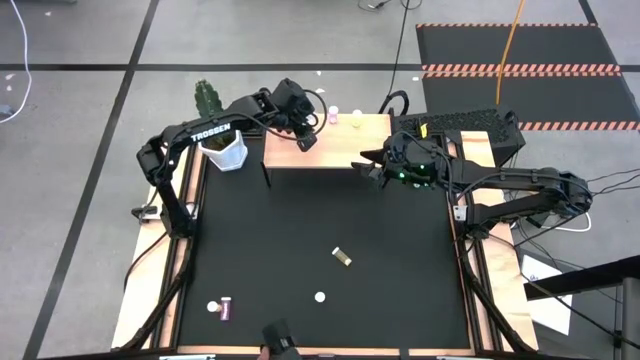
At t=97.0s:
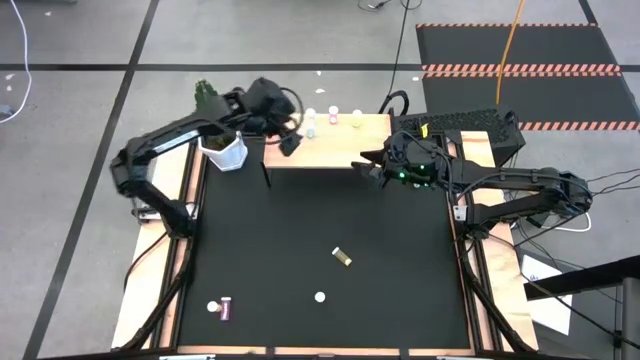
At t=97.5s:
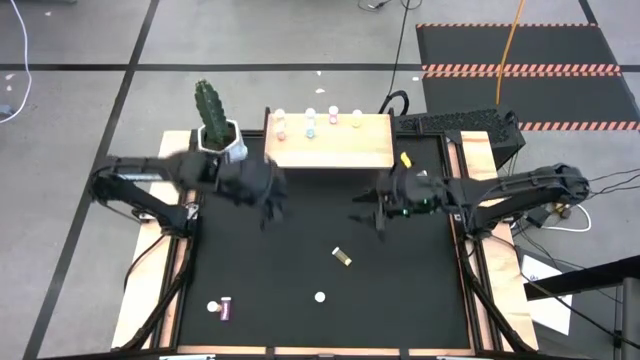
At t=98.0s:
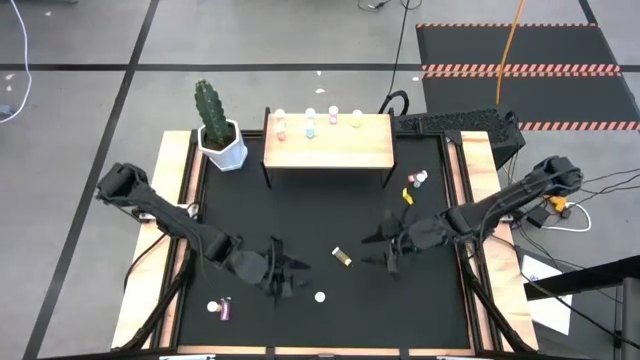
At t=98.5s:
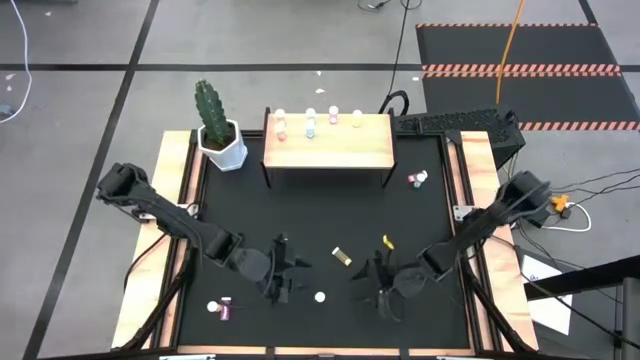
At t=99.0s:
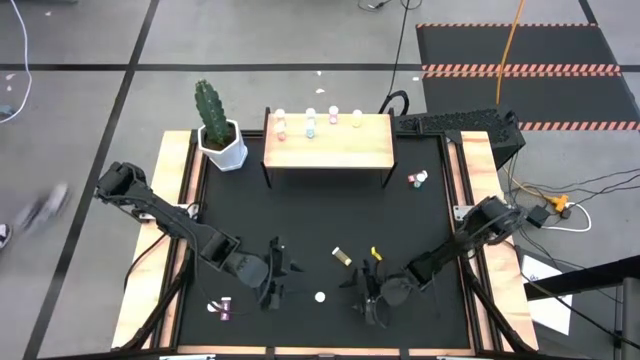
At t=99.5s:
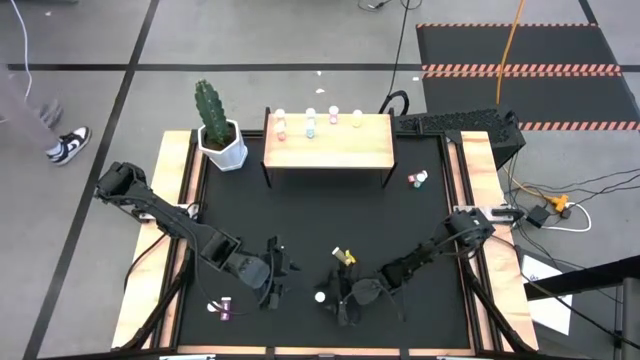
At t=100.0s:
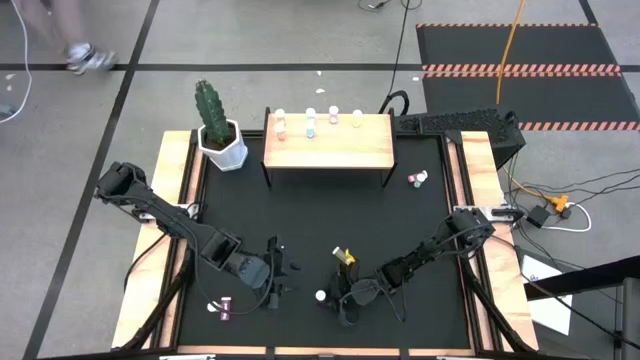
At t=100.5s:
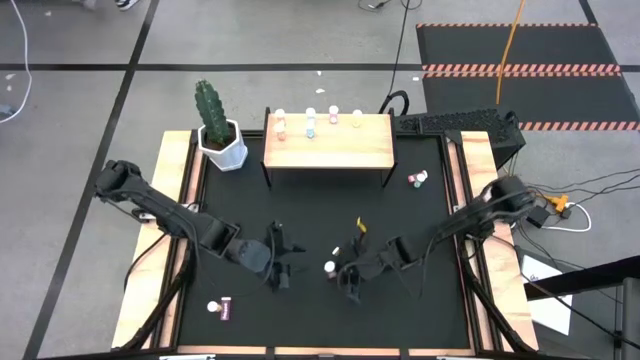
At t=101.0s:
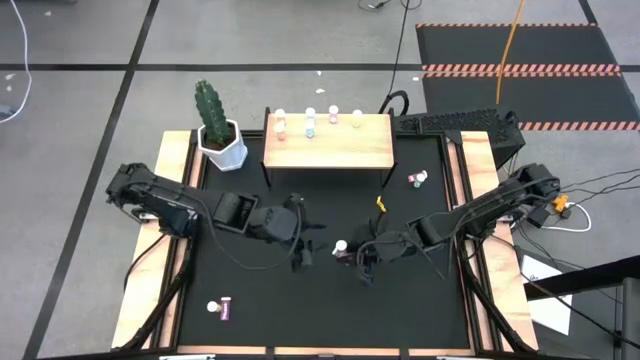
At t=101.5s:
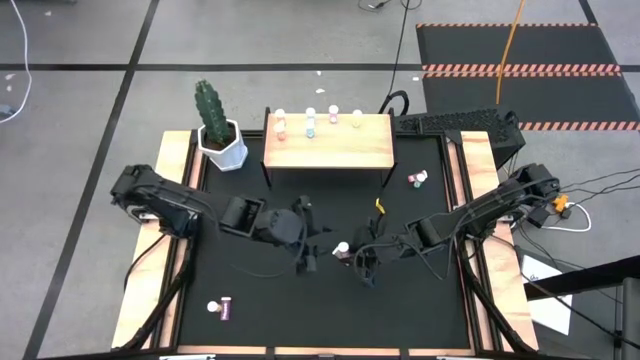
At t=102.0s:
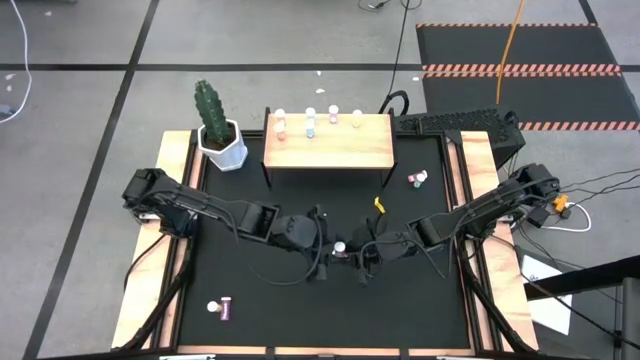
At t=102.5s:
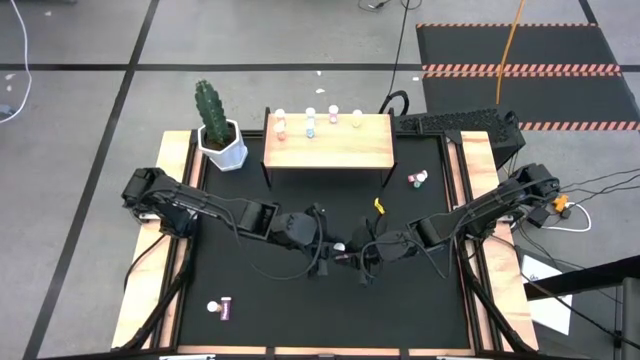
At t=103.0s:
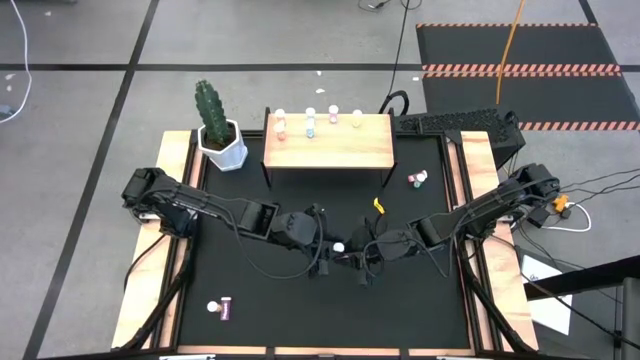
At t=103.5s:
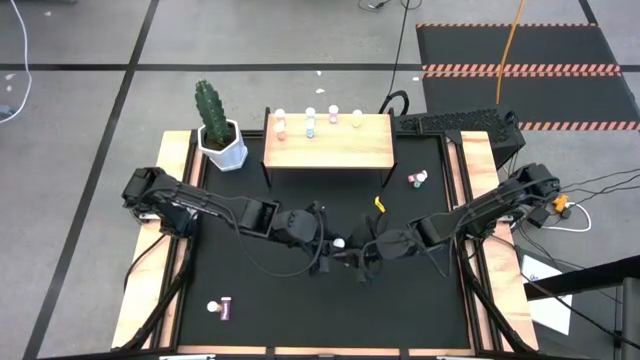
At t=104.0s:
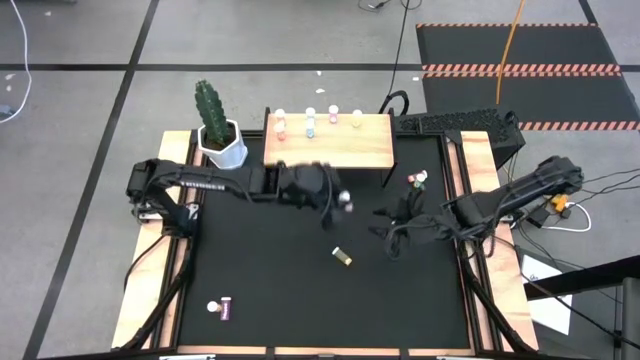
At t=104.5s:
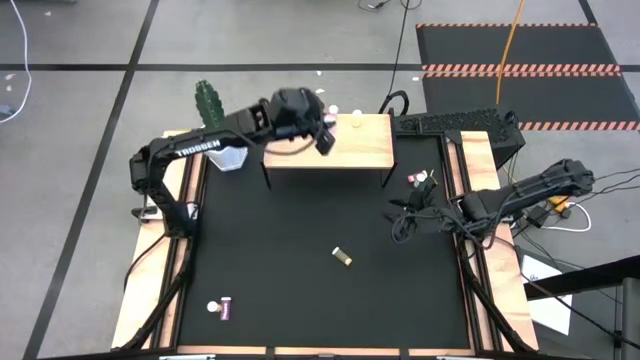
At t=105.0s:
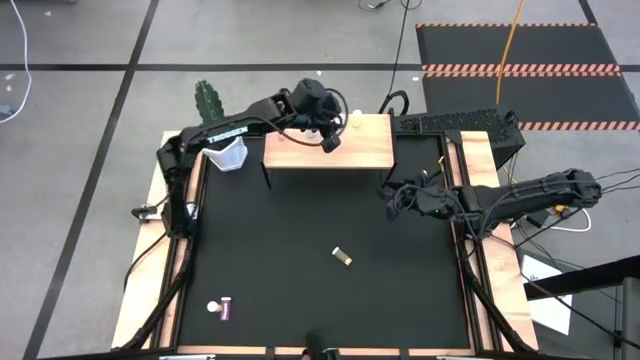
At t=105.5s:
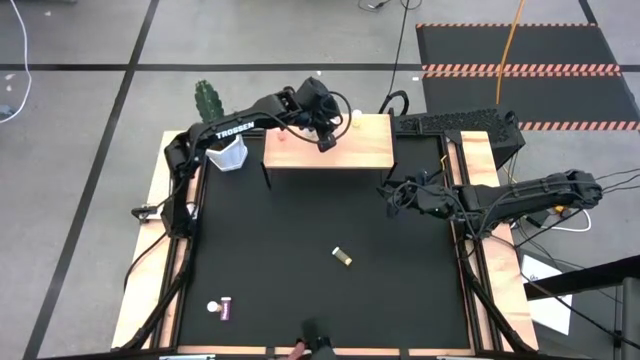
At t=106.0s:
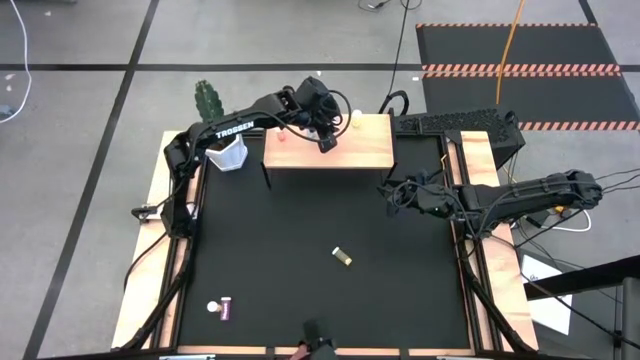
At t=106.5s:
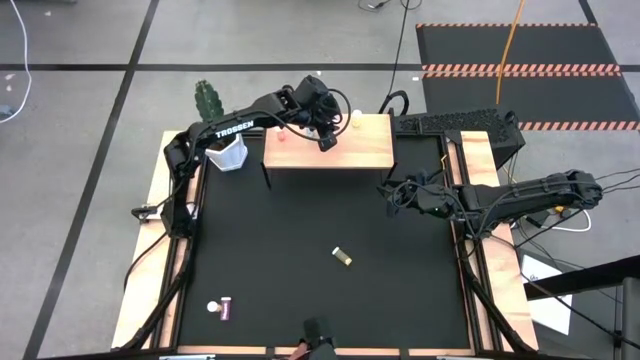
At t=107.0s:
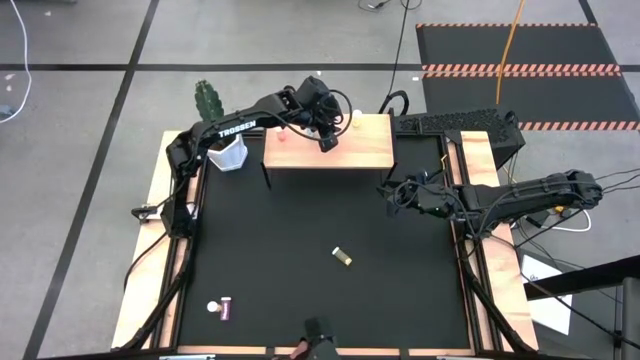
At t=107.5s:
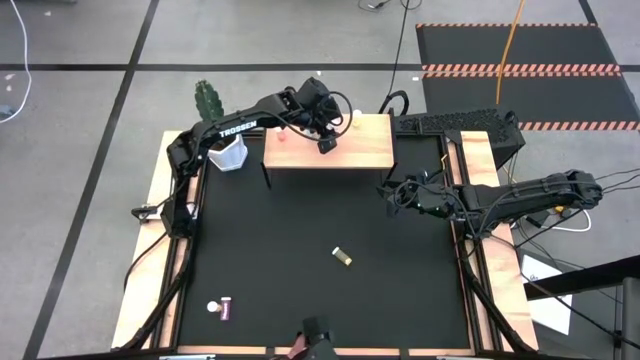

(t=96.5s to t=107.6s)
Task: Pick and place medicine bottles onto shelf by color
Put the right pink pill bottle aligned with the other pink pill bottle on the shelf

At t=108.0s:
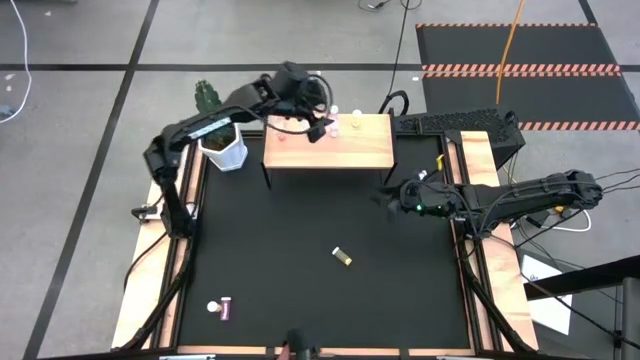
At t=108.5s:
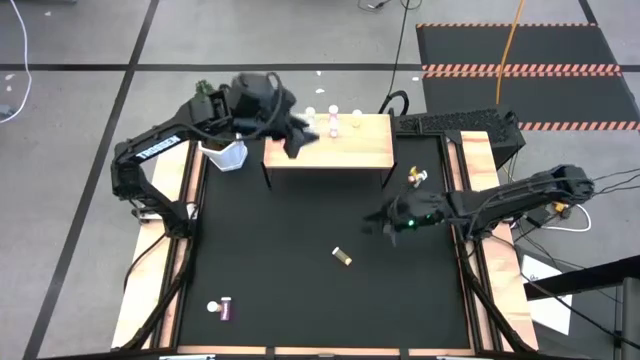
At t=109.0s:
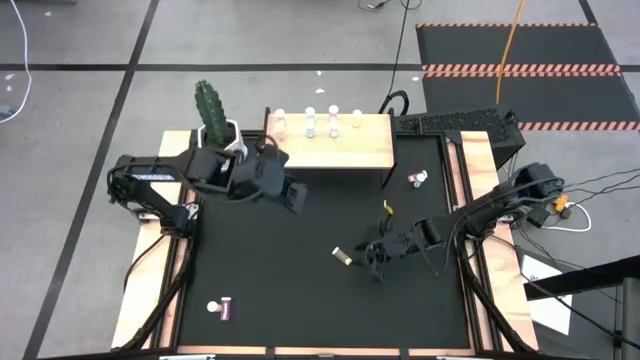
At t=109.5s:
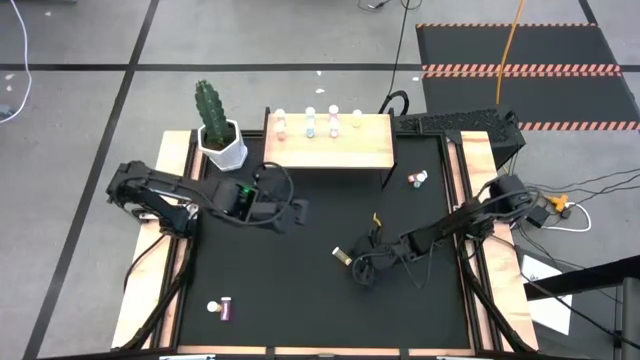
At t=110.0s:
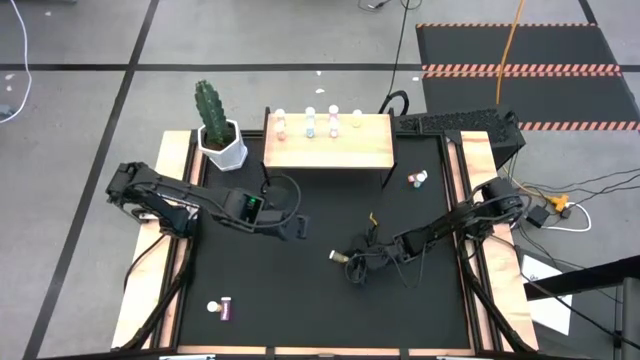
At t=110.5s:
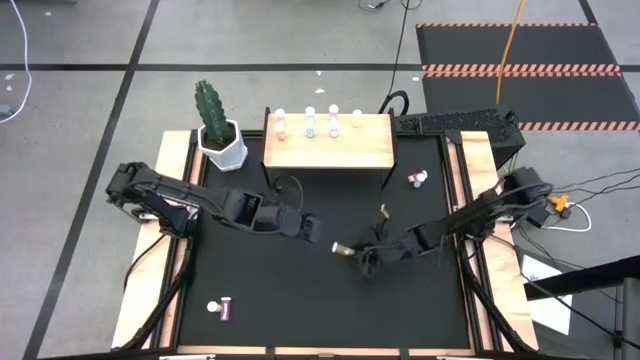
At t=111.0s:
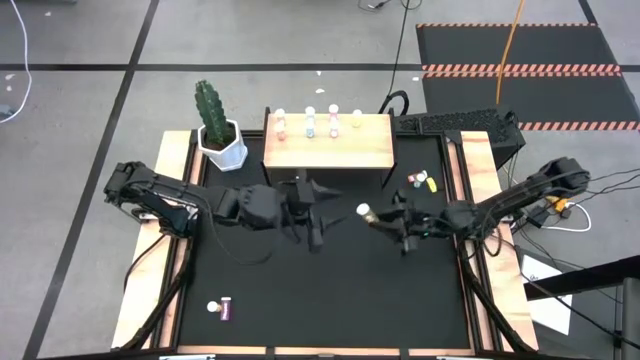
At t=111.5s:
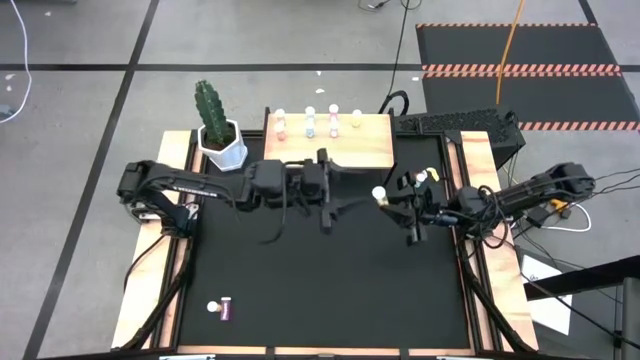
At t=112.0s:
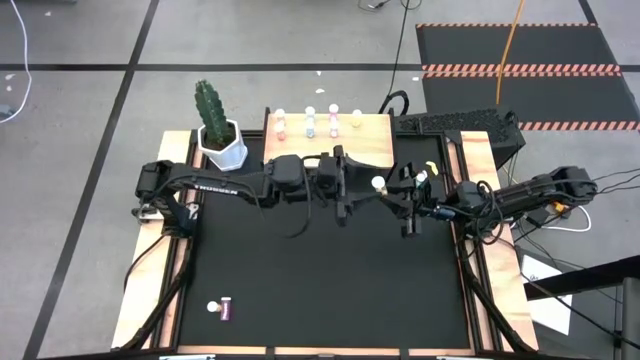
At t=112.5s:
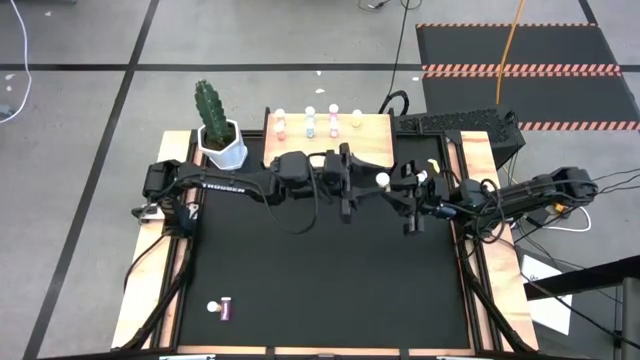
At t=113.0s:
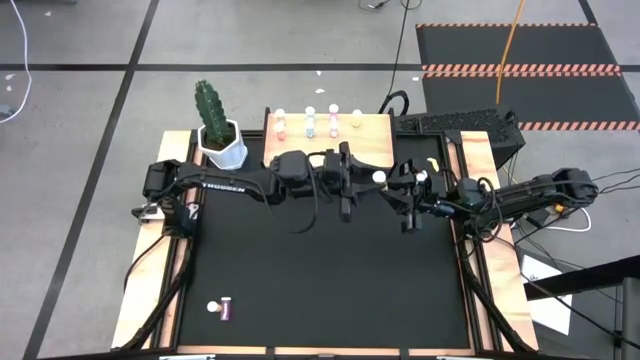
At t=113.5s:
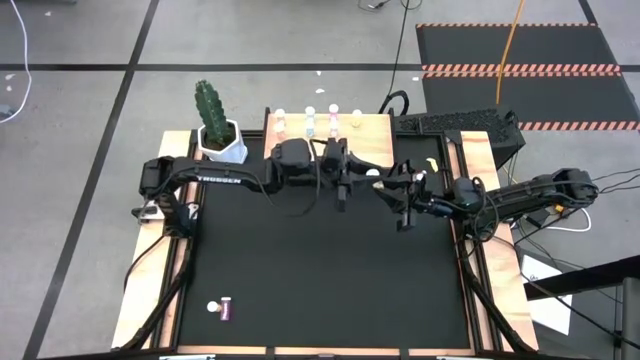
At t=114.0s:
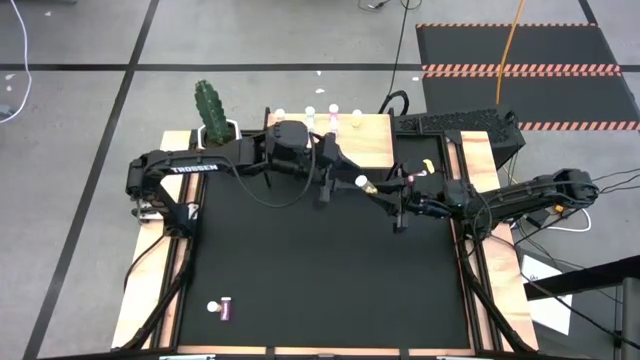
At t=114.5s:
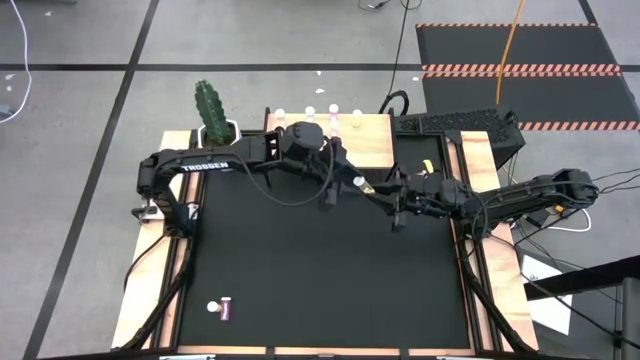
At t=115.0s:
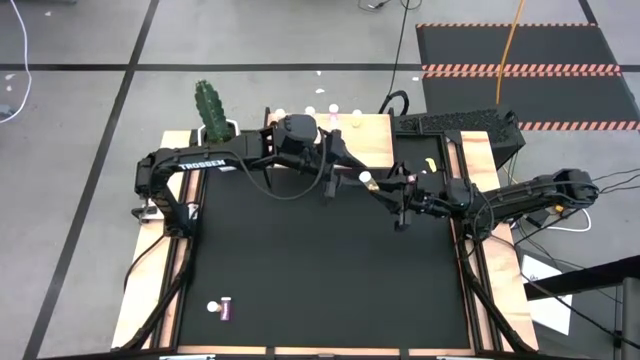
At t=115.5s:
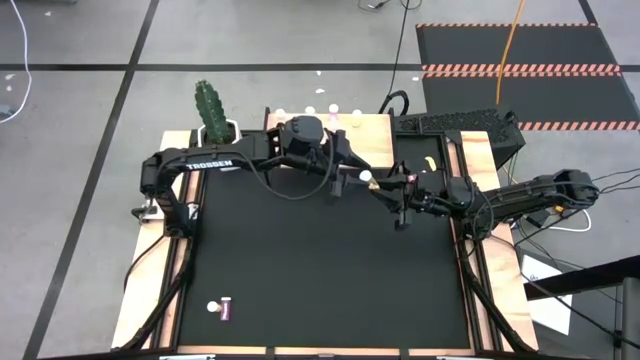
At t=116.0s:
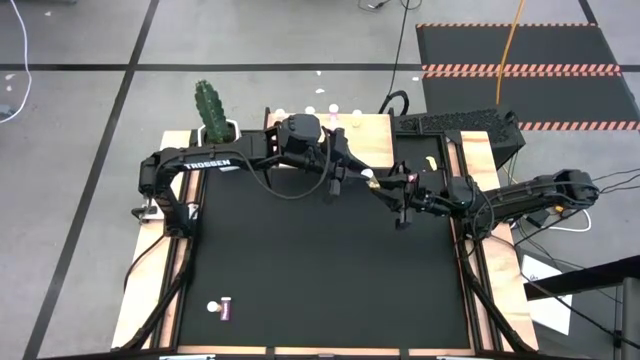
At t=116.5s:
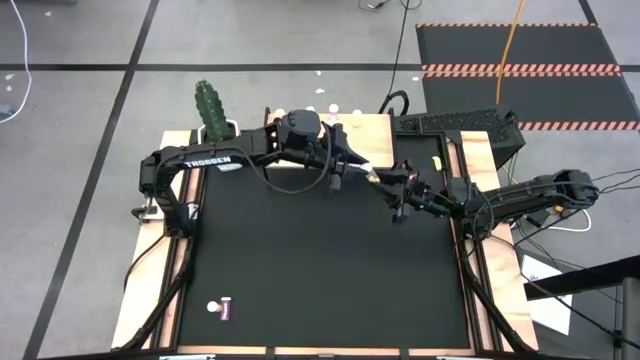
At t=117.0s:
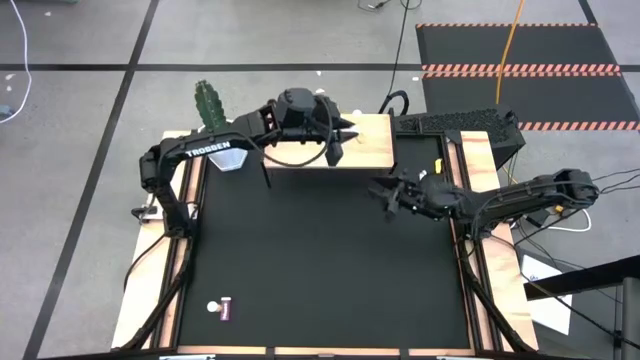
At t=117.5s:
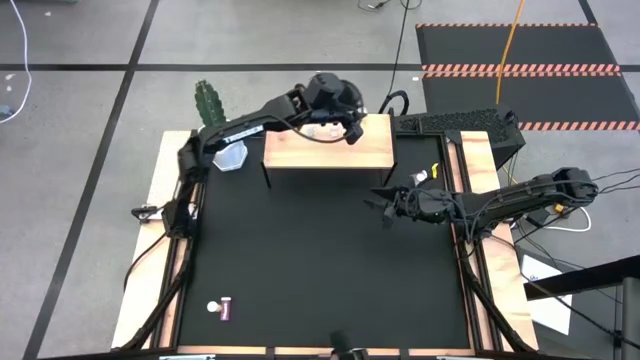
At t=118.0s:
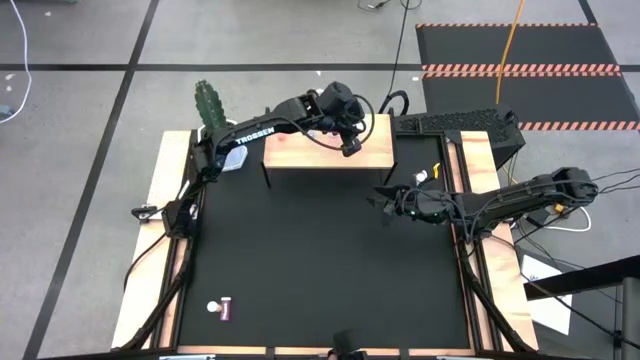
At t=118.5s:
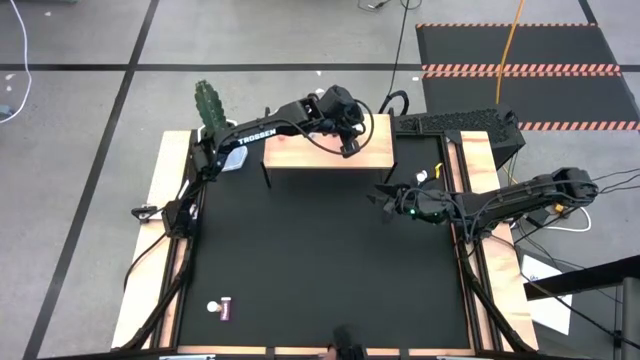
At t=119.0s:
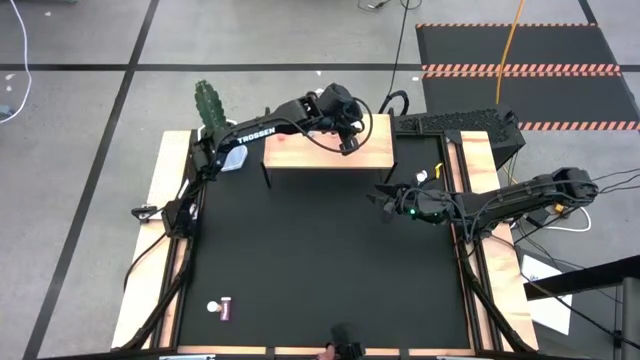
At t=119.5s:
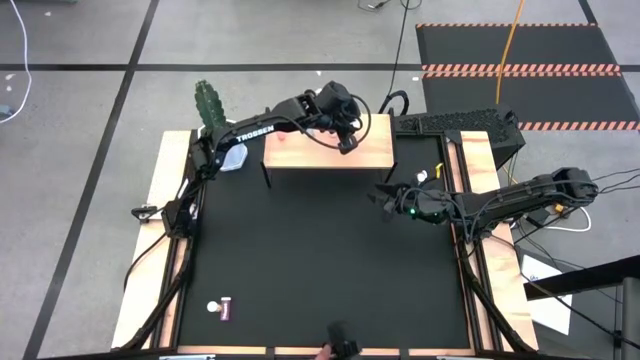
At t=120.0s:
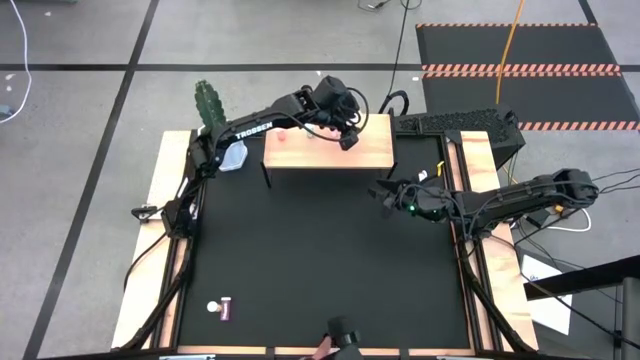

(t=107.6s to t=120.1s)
Put the right yellow pill bottle aligned with the other yellow pill bottle on the shelf
